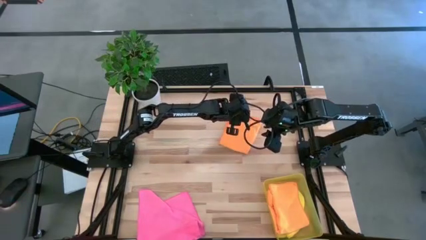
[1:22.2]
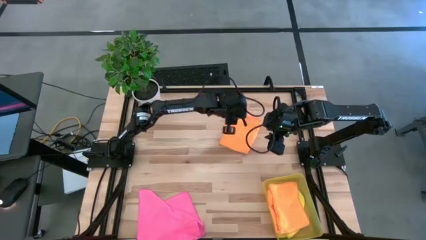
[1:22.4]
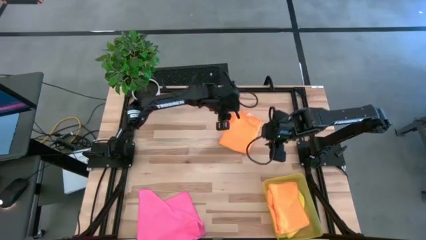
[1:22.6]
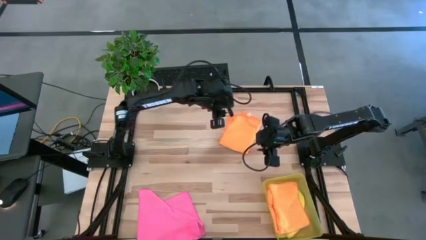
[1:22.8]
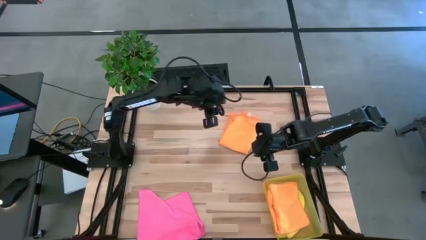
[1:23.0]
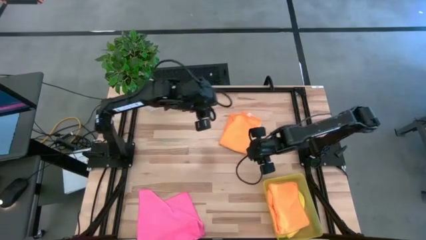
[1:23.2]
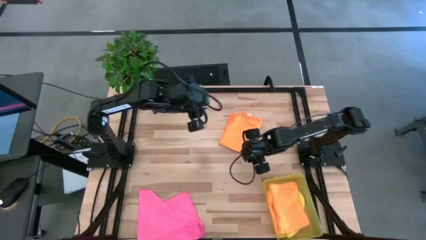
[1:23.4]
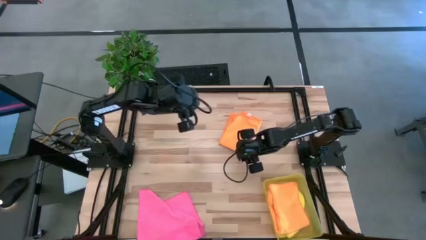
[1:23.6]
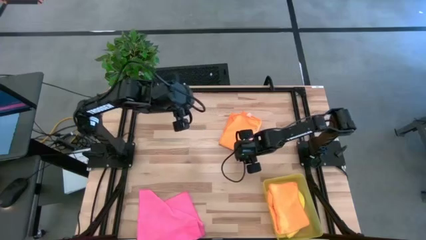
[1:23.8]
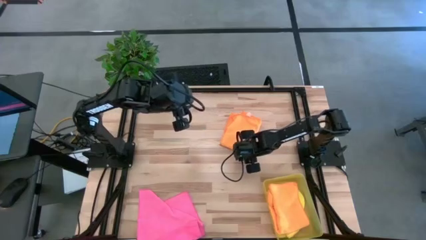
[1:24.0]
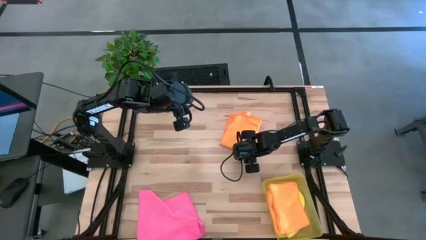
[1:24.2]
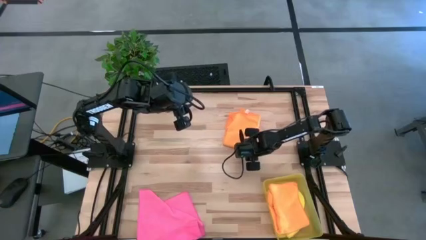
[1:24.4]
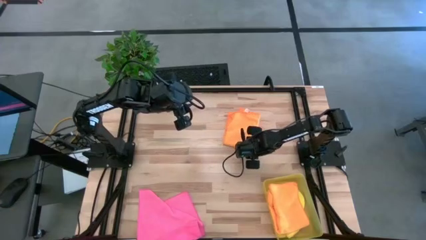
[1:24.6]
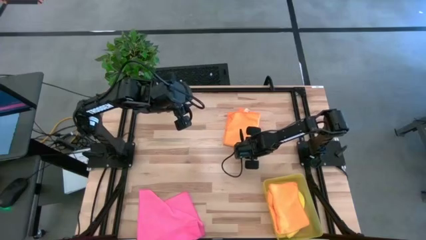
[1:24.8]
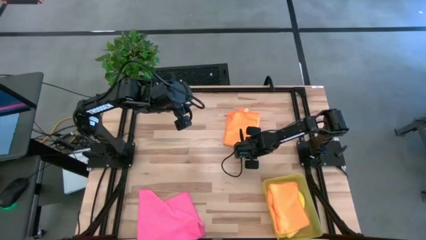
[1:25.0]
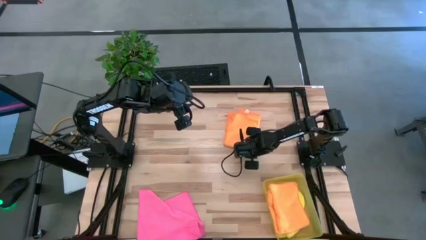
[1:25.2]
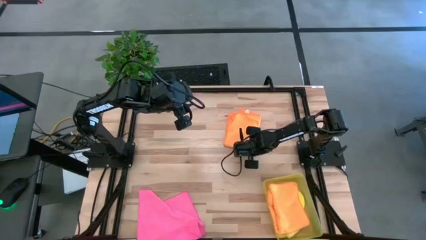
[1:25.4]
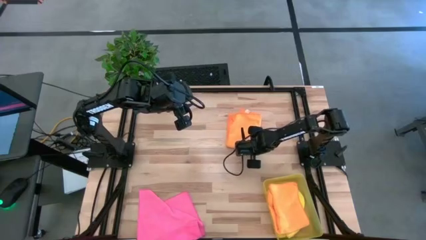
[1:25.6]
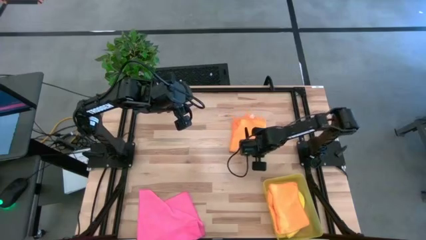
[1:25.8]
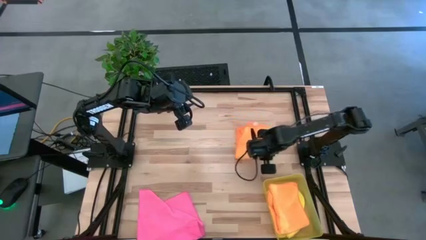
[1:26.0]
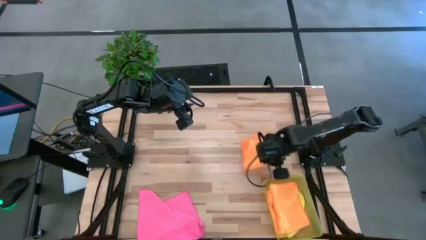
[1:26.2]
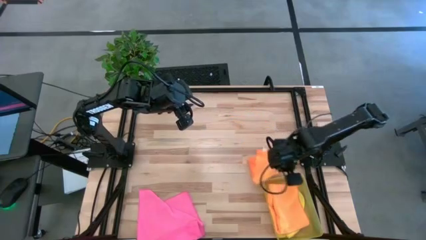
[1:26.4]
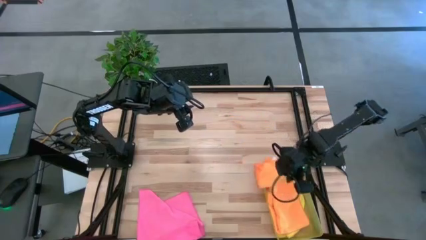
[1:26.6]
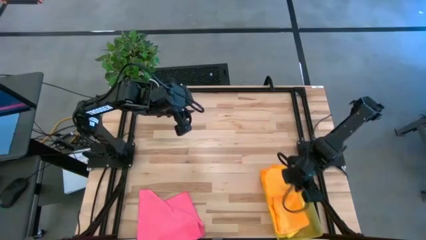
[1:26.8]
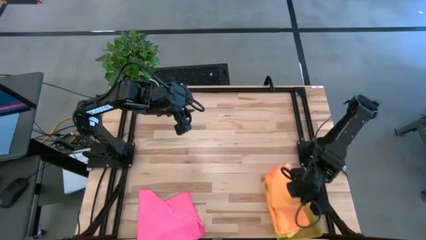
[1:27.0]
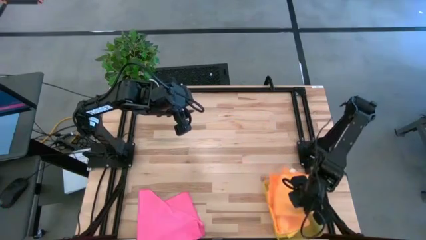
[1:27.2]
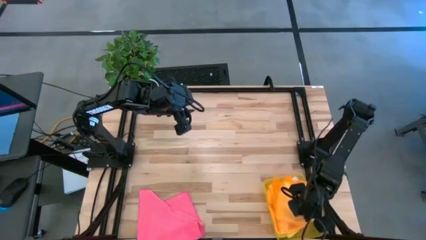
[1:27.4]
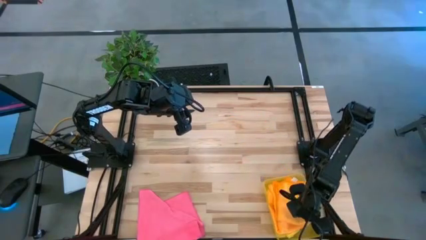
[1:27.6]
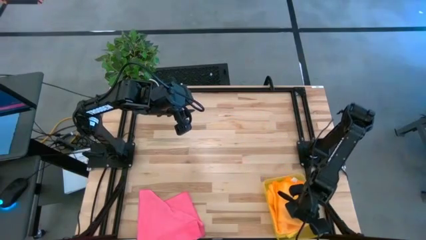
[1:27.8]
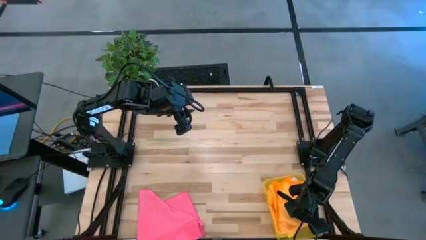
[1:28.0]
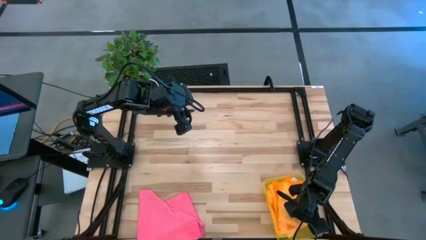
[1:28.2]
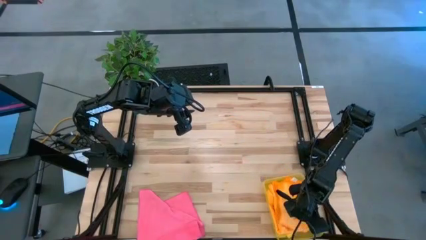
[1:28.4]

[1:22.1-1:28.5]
Task: Fold microfiber towels
Stack the folded orange cloth on top of the folded orange cloth in the yellow bin

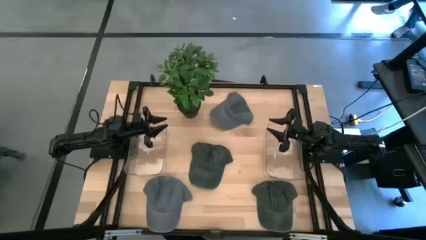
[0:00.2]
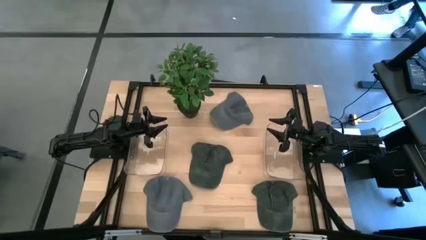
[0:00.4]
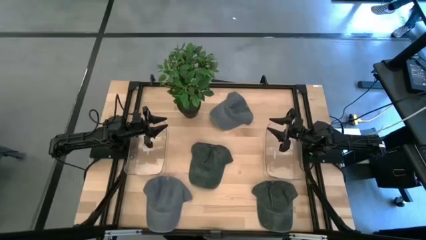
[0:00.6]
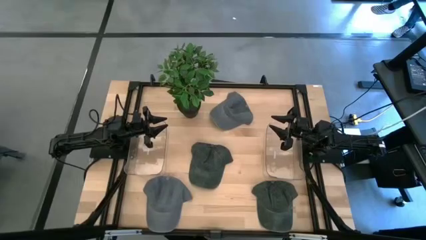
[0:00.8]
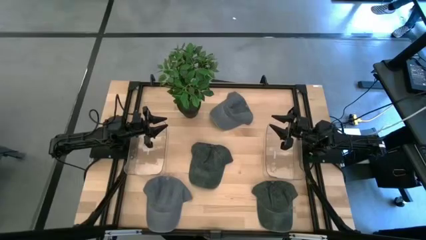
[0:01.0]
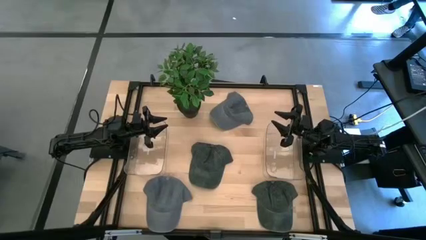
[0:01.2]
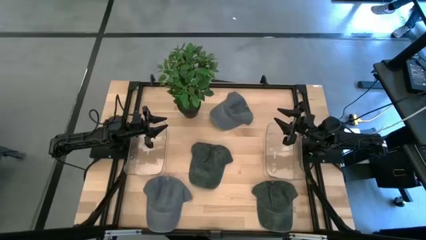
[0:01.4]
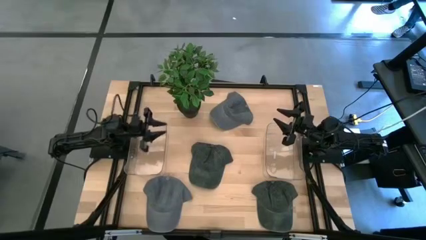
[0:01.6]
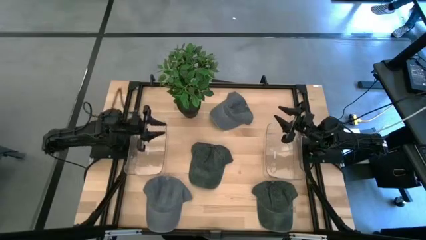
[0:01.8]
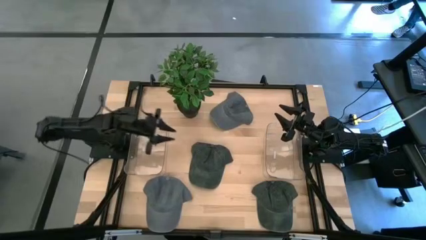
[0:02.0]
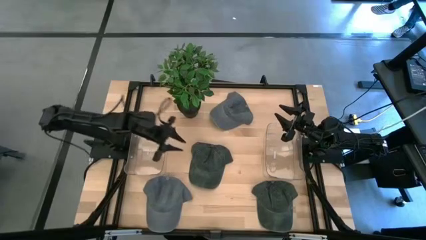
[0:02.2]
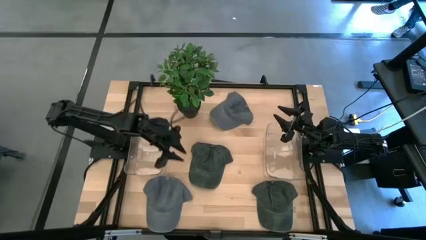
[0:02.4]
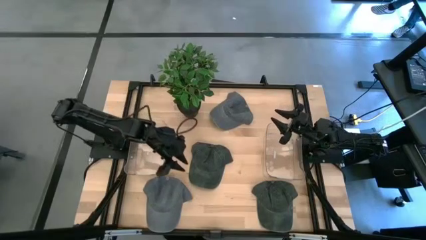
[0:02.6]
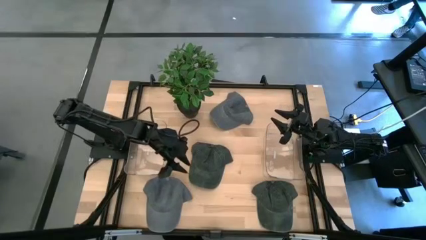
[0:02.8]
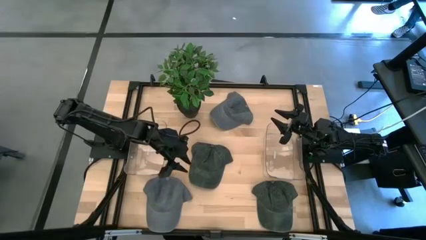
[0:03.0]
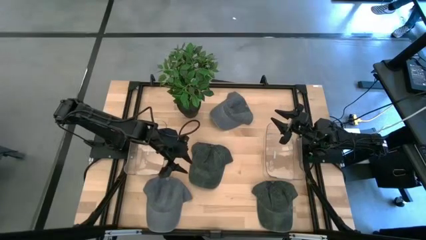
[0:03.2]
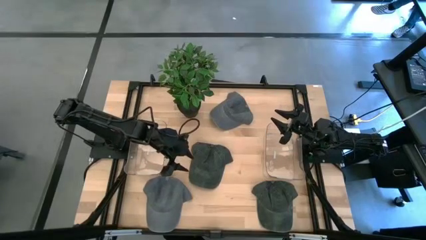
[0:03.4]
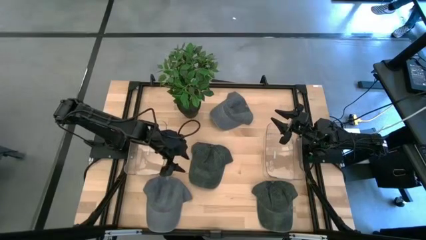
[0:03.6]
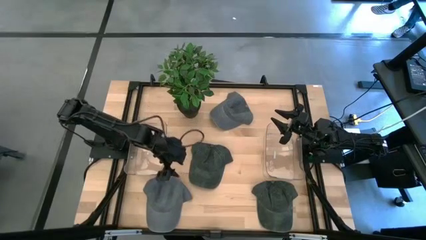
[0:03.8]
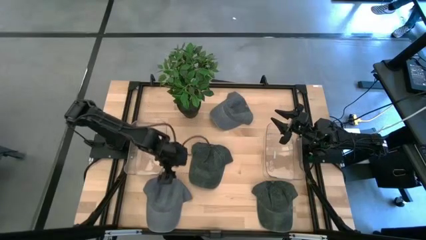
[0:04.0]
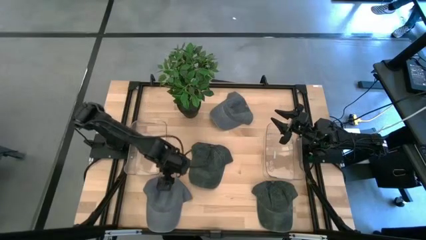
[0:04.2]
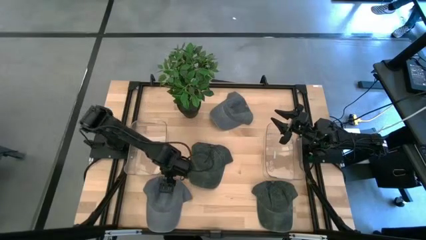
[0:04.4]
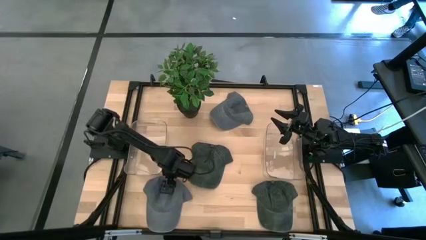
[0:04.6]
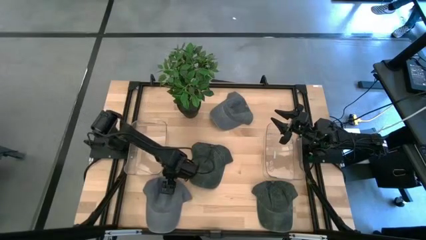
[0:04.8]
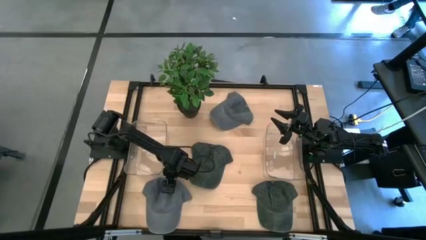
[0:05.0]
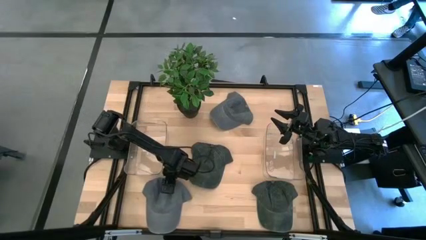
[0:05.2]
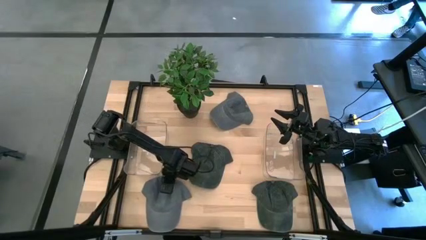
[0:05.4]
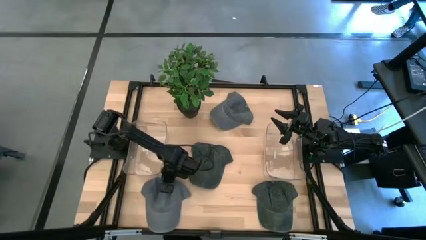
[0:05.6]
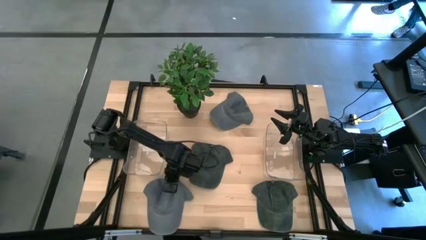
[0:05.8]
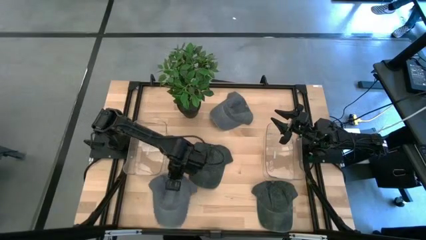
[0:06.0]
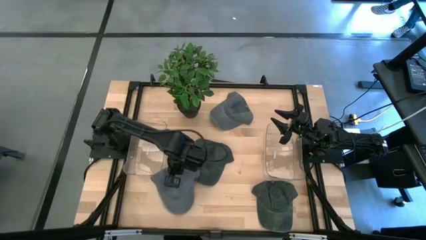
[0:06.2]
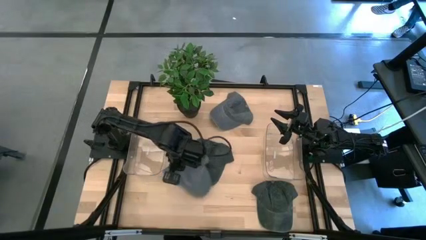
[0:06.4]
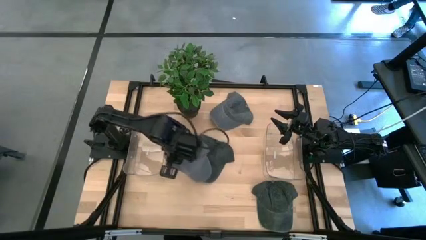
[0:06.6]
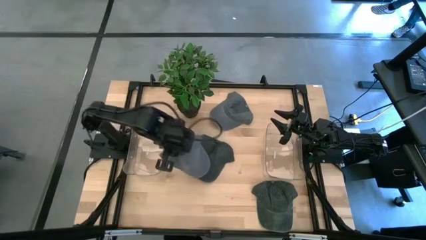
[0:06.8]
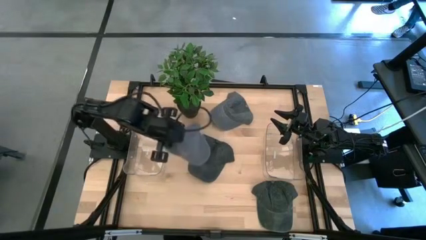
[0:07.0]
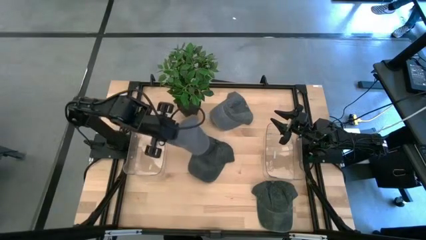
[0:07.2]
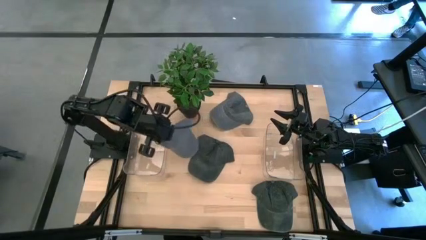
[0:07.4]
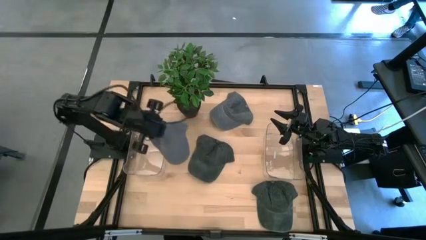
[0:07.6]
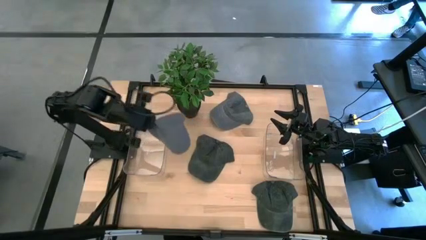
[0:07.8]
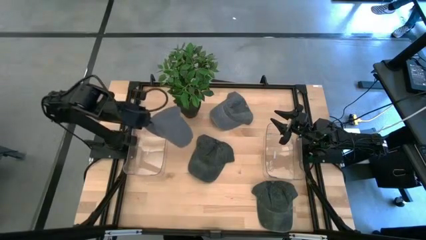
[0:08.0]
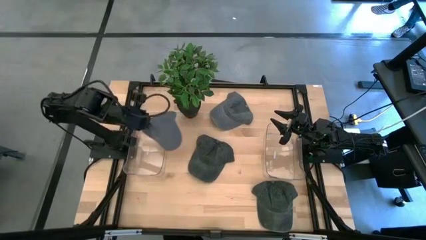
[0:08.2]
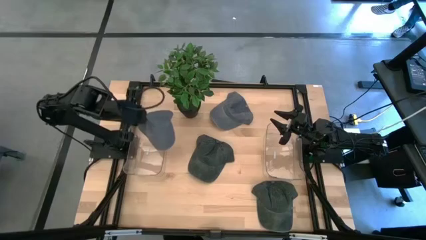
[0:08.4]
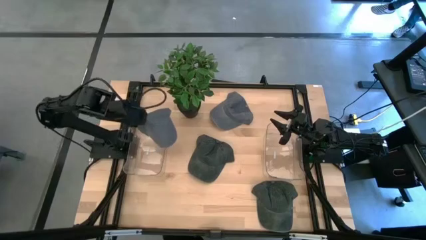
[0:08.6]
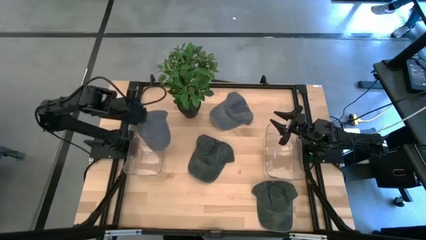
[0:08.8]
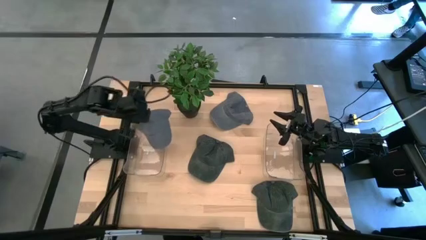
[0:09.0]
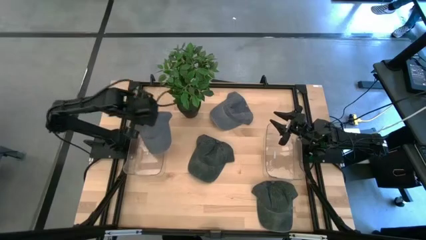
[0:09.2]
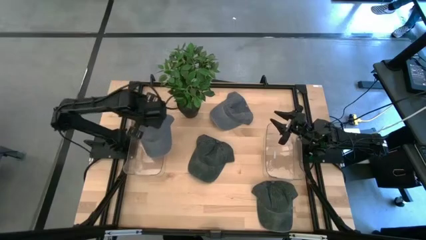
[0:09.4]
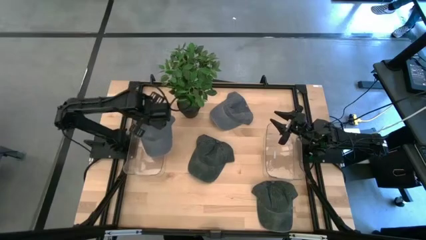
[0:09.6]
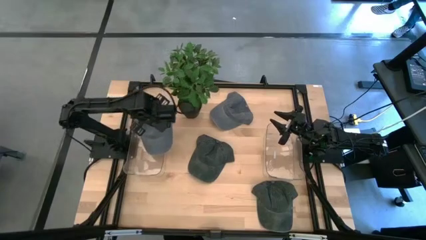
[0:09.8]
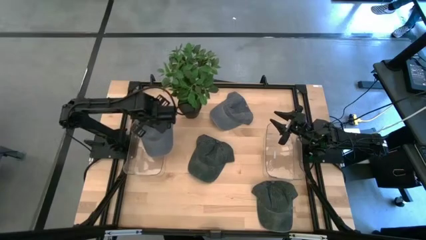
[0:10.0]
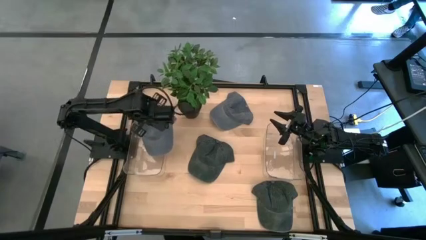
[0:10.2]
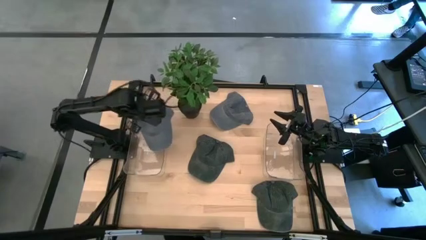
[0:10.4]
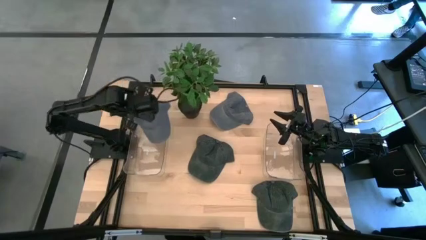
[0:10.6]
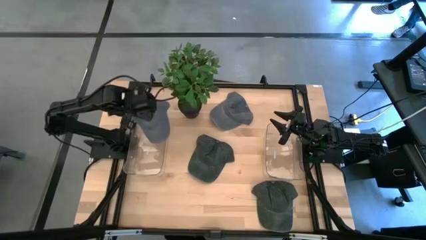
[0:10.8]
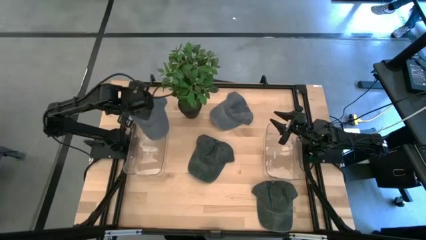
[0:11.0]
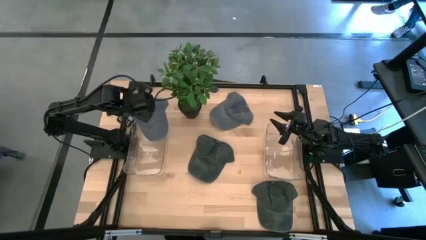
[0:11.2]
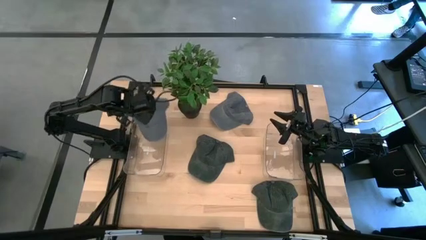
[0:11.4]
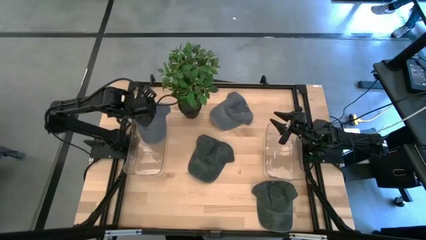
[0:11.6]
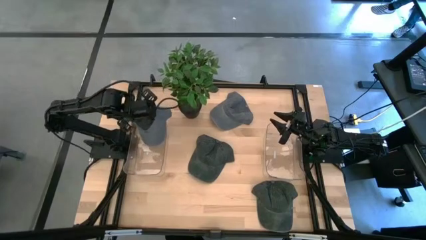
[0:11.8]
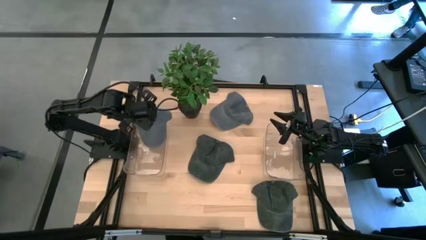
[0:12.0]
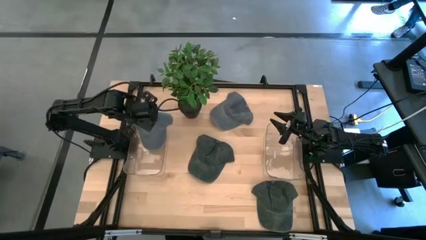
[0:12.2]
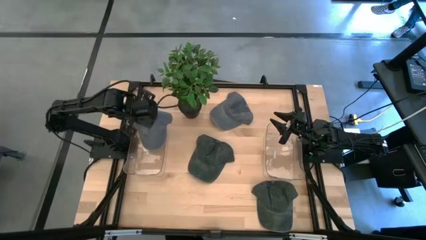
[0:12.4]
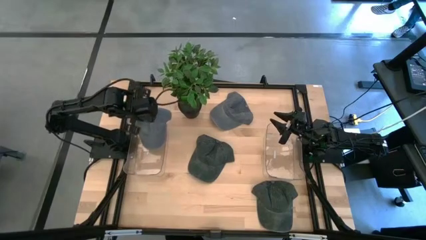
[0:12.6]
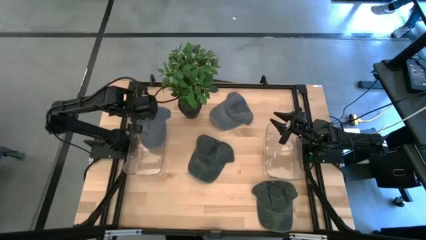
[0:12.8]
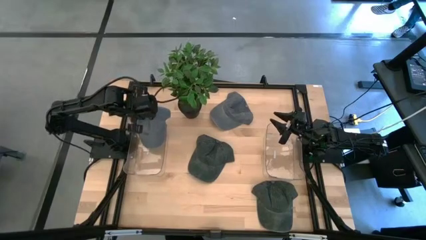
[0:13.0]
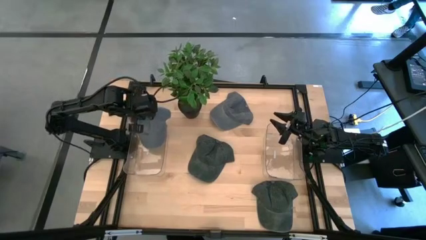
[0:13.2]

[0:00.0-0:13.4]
Task: Pick & Place hat
Put the bottom gray cap into the left transparent bin
